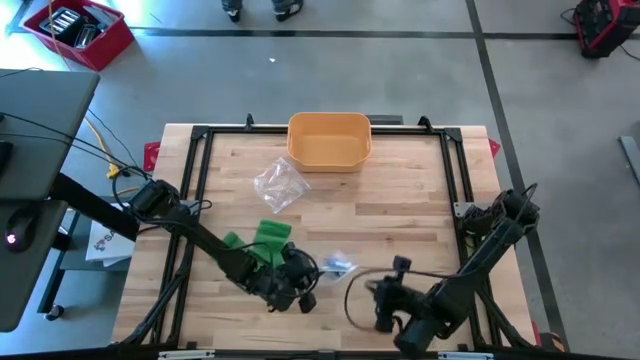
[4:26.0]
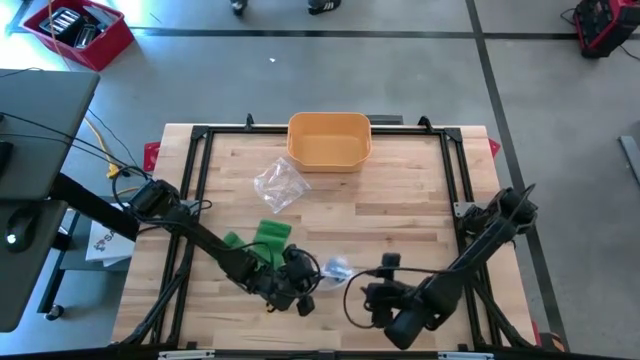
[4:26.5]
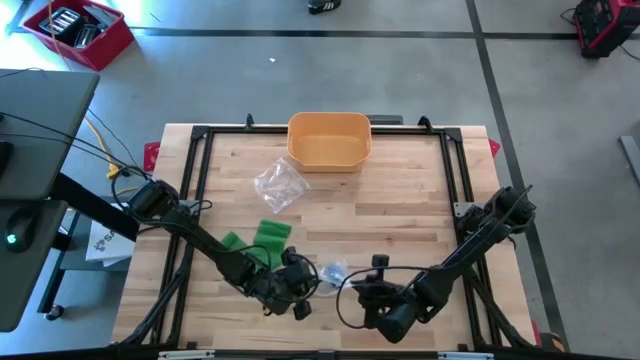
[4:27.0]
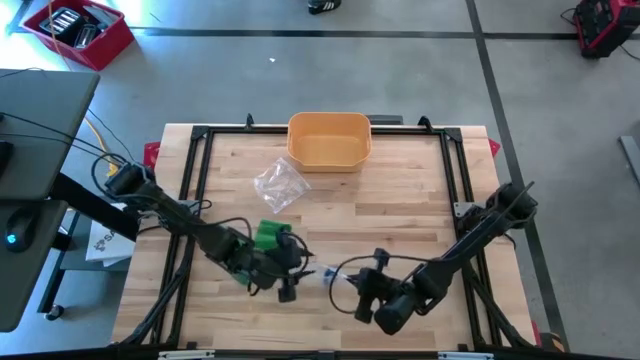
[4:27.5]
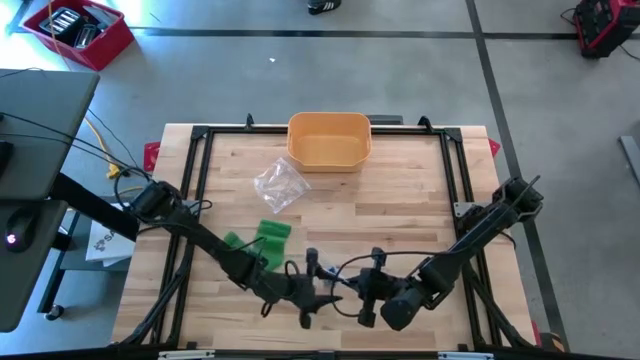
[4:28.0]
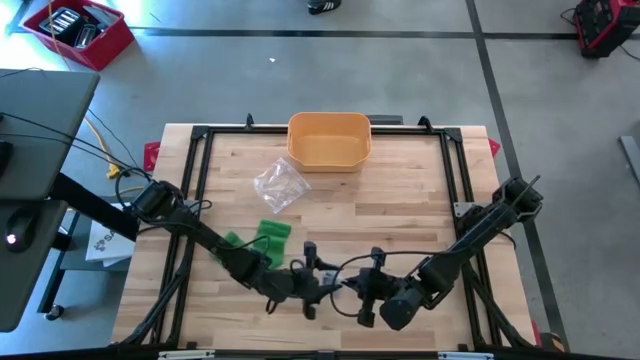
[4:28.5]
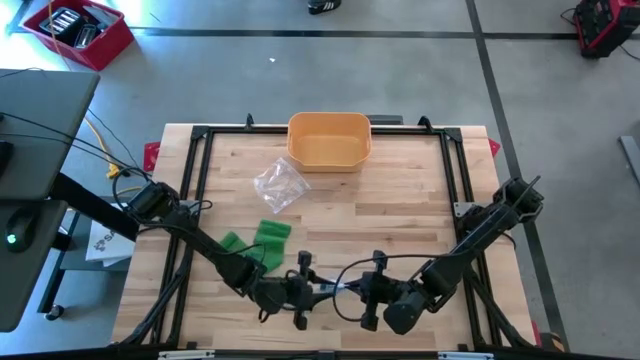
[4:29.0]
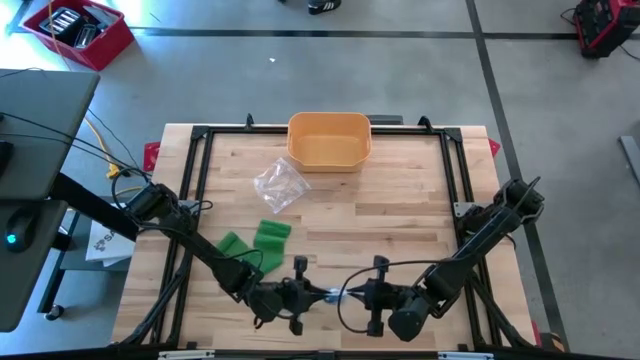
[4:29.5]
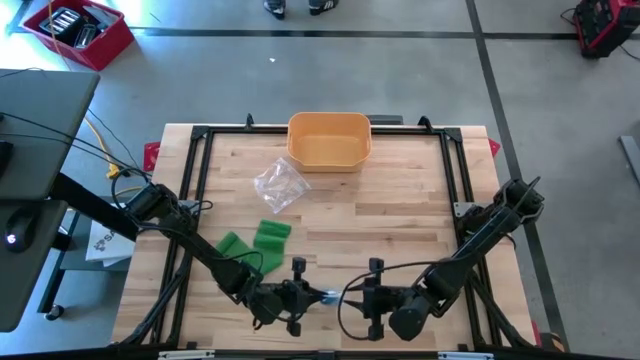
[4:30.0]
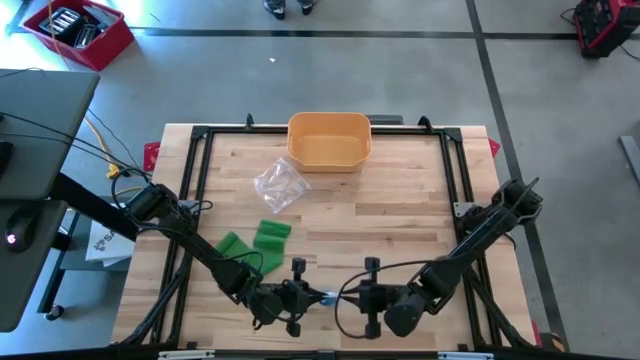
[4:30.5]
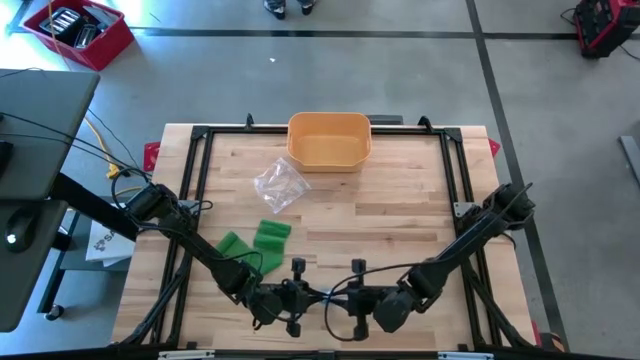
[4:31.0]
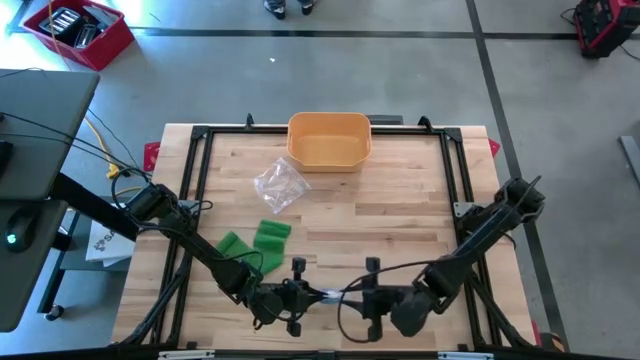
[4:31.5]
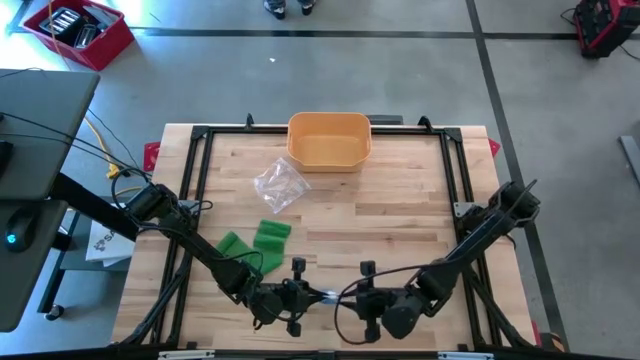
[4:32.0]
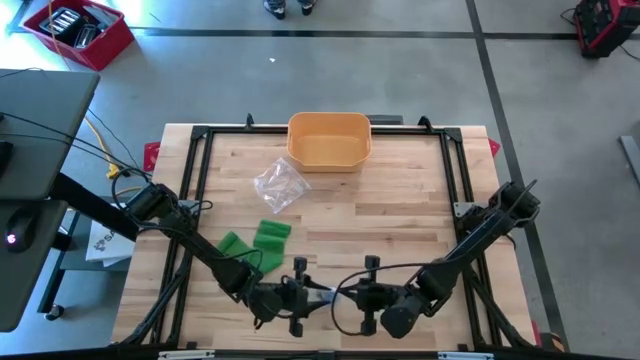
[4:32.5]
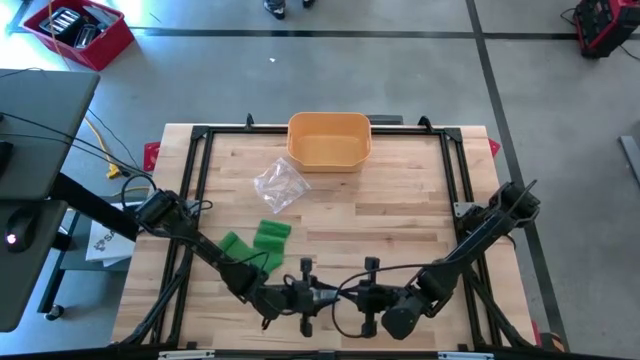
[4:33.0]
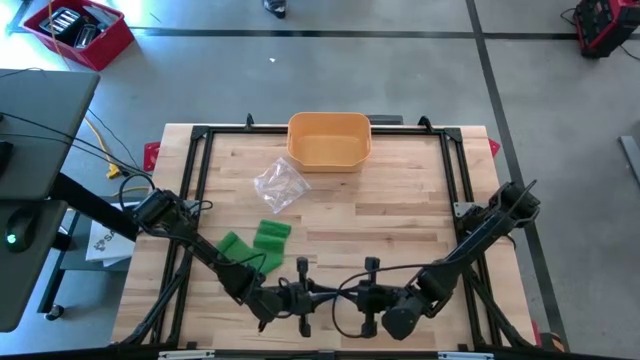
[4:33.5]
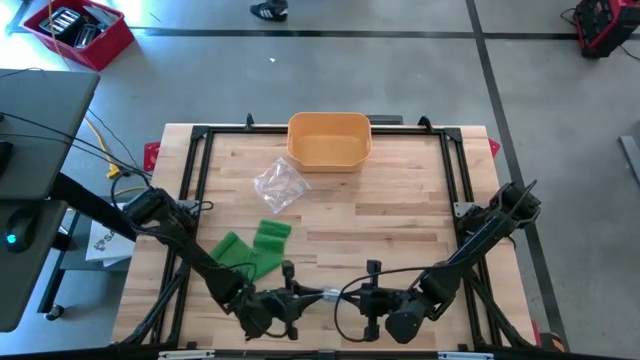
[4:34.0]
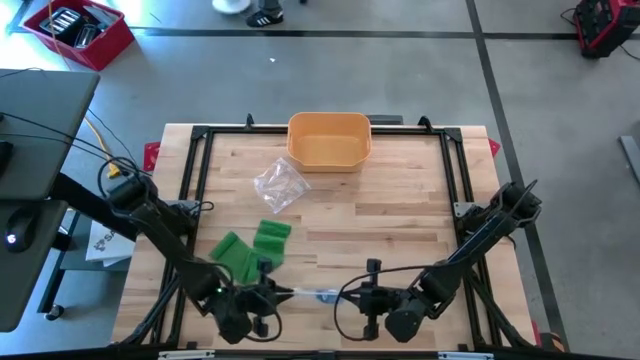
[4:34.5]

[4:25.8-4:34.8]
Task: Roll bandage
Close the transparent zip bag with the rolled blue bandage

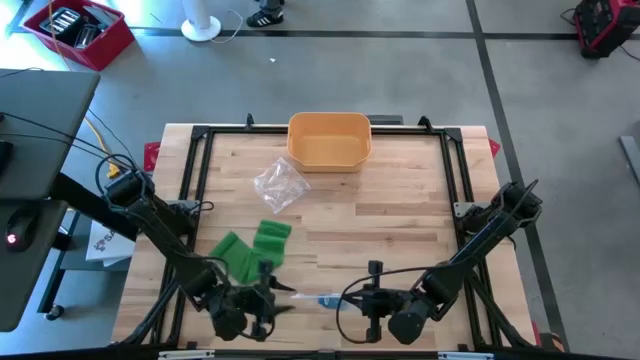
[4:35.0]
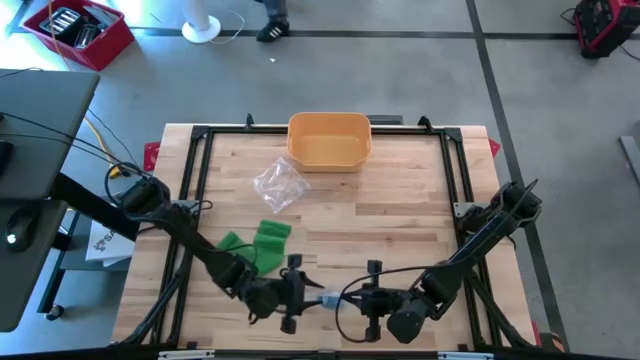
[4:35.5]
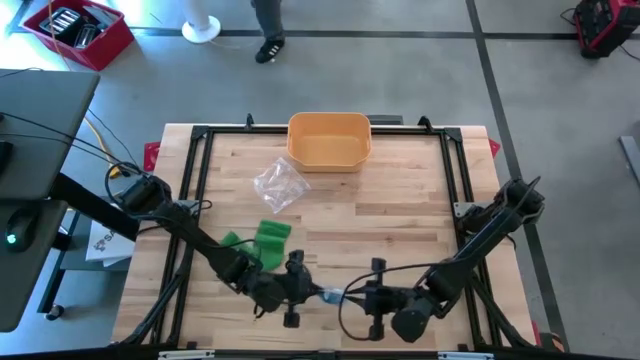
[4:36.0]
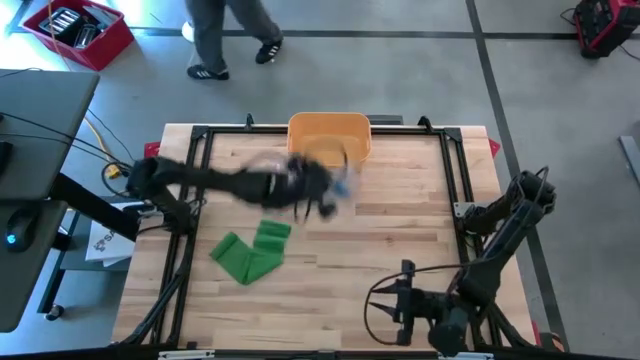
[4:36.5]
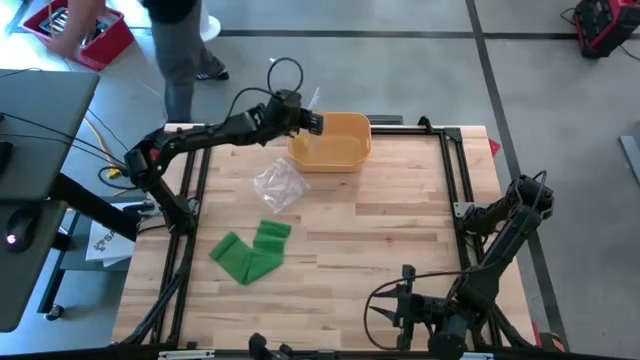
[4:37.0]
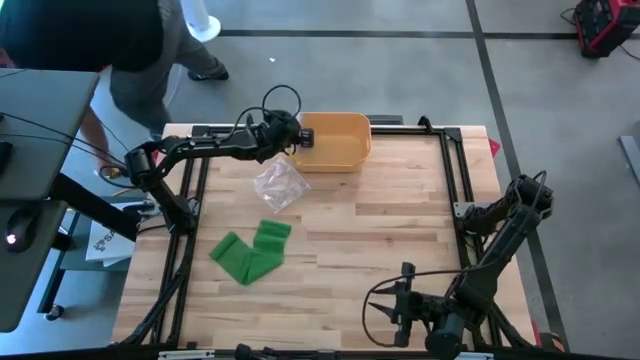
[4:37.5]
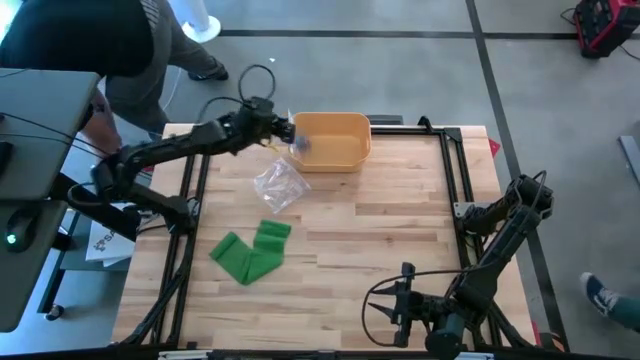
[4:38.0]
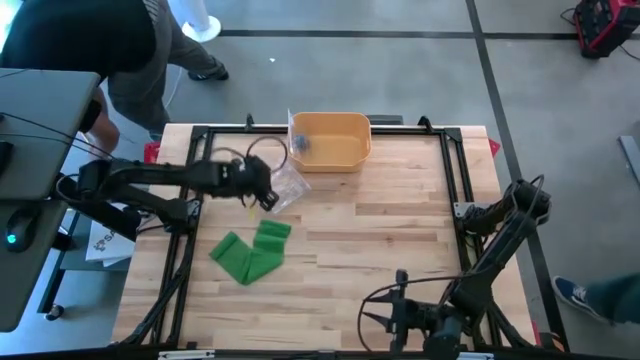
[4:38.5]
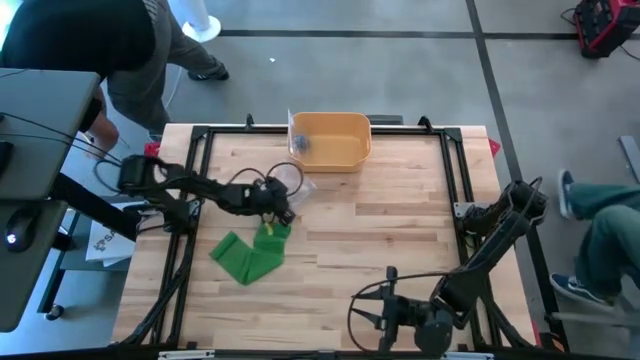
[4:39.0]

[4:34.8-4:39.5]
Put the transparent zip bag with the rolled green bandage into the yellow bin

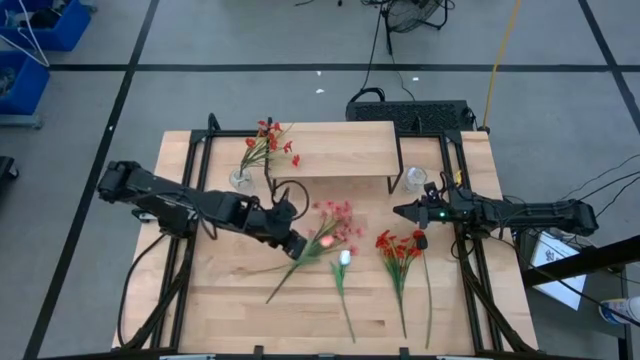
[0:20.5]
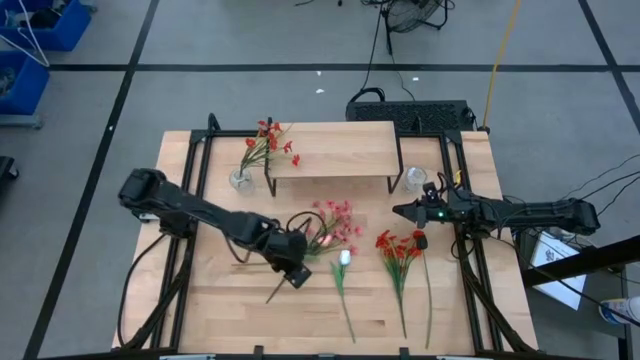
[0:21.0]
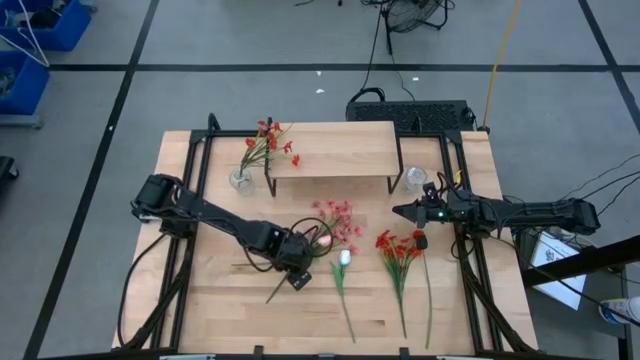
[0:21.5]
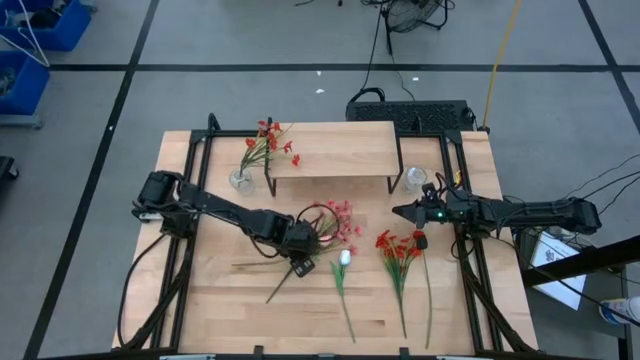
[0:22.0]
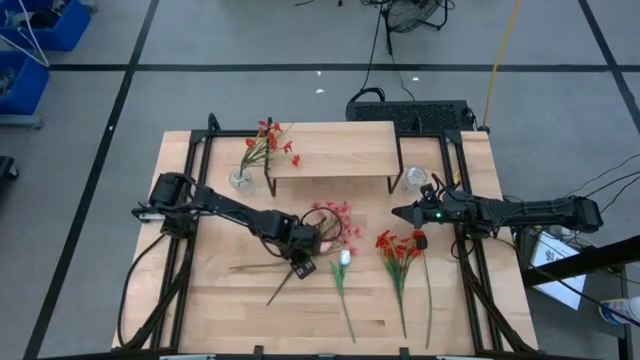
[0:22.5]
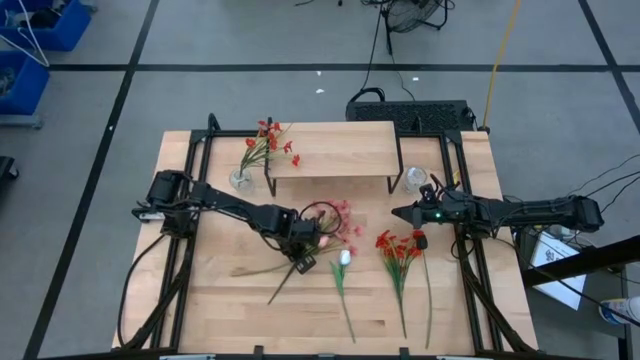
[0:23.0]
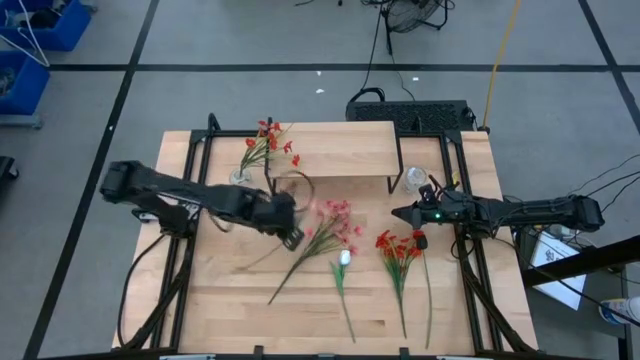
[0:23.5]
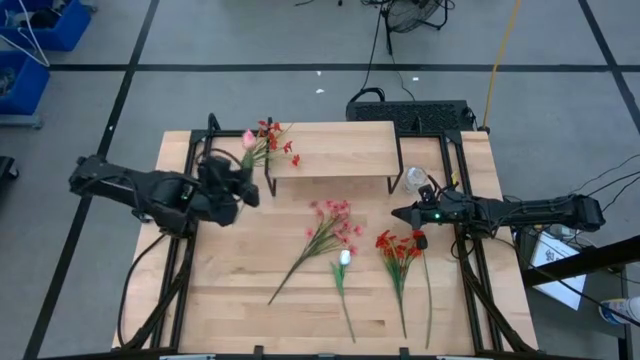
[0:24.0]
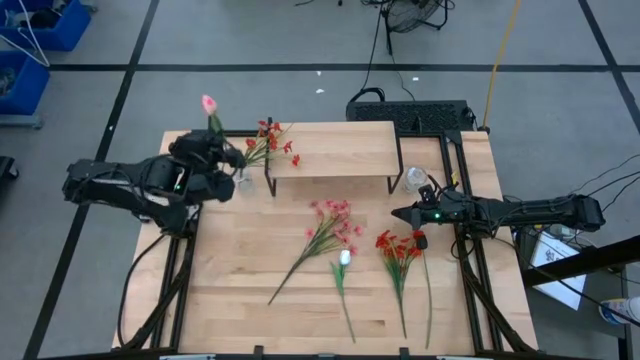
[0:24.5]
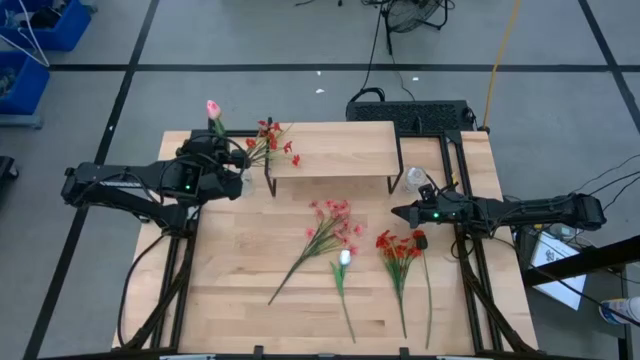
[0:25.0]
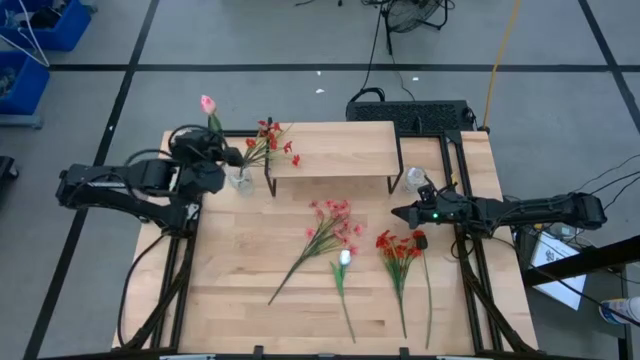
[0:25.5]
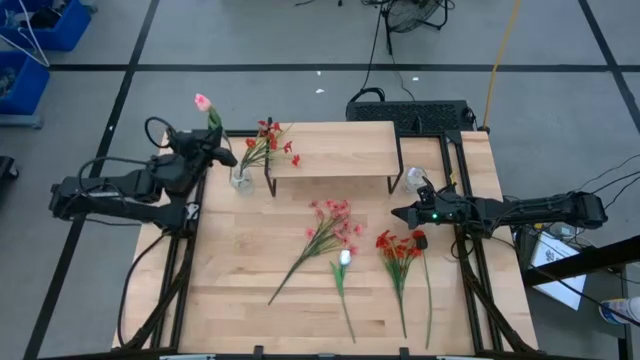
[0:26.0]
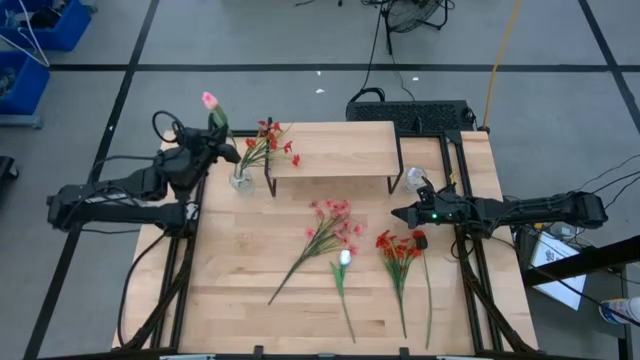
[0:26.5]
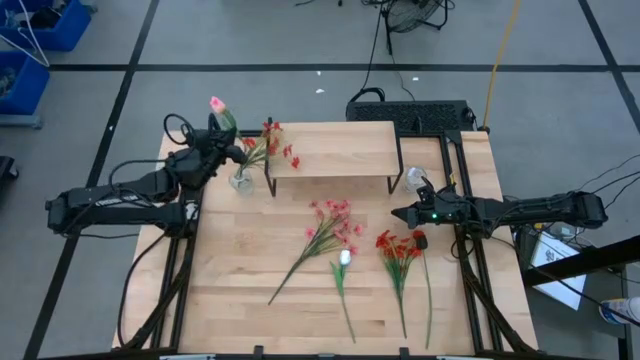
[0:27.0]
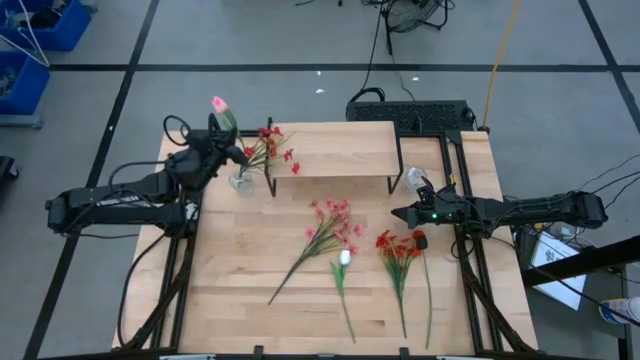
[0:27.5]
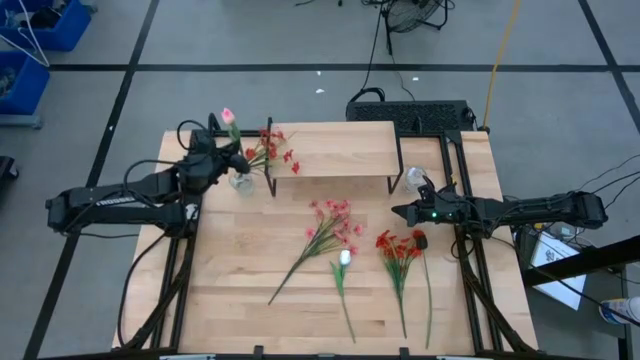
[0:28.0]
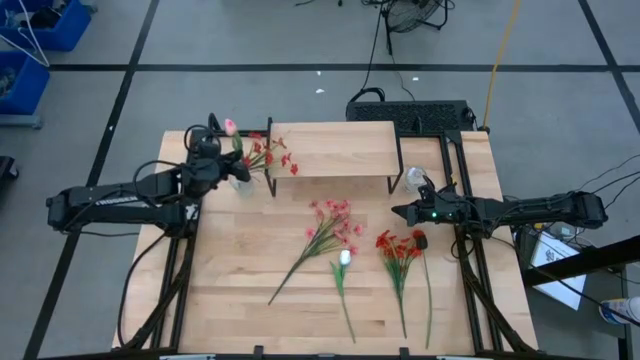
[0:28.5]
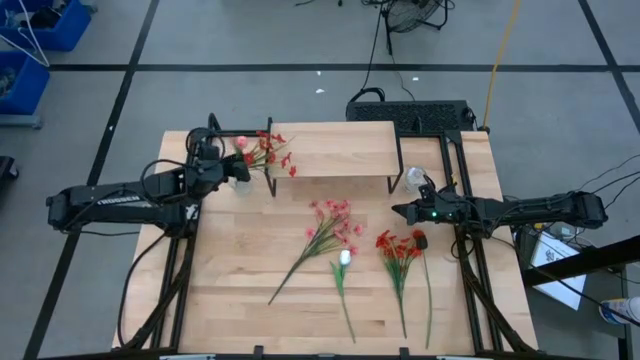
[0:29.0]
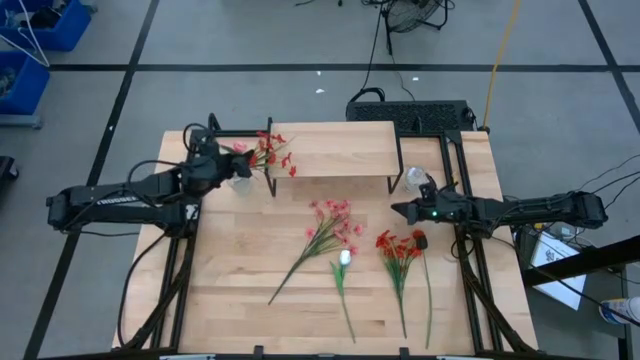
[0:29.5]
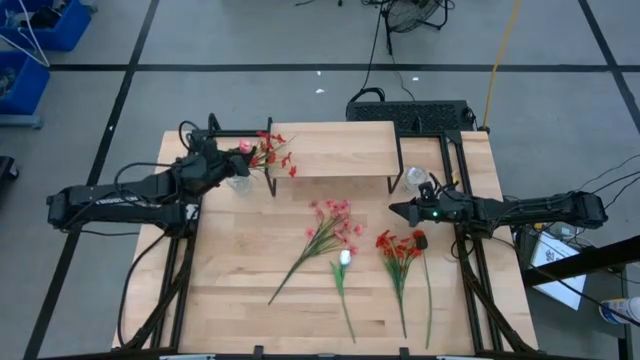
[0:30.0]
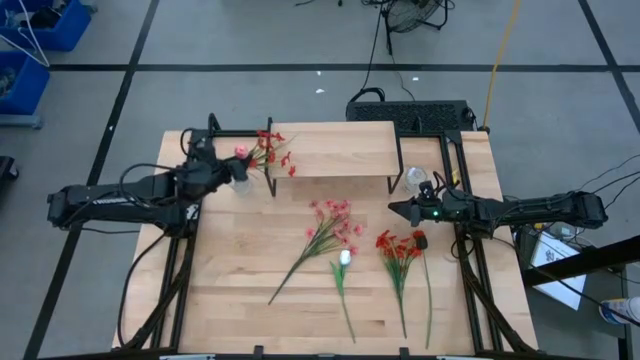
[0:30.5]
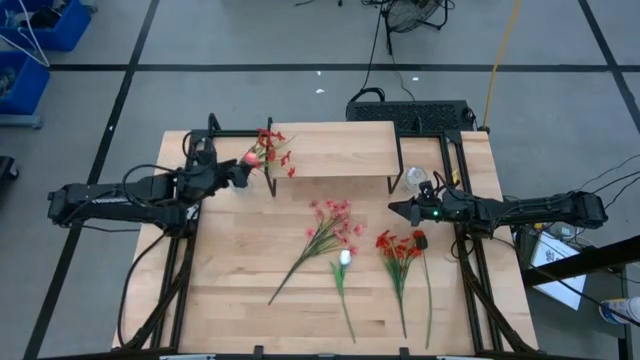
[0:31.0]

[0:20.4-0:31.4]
Task: Pick and place flowers into a vace then onto a shelf
Put the pink flower into the left transparent vase
